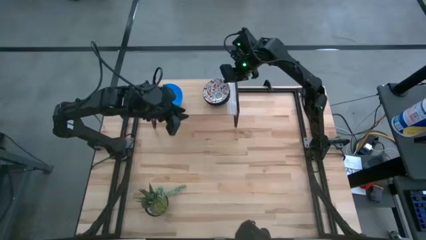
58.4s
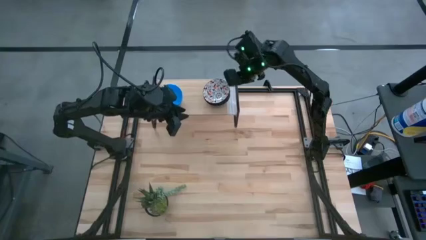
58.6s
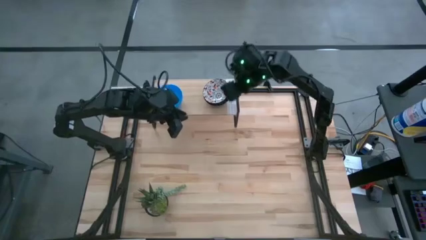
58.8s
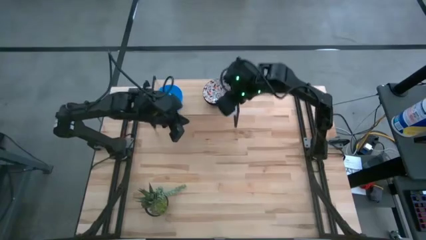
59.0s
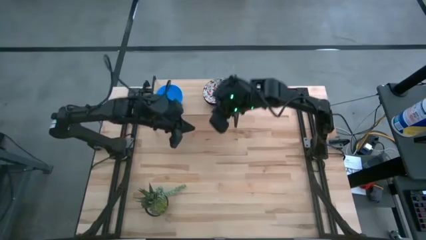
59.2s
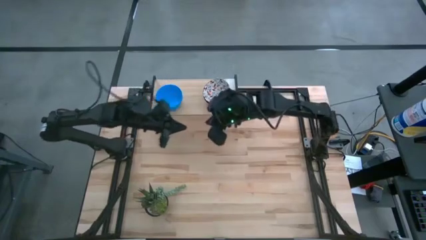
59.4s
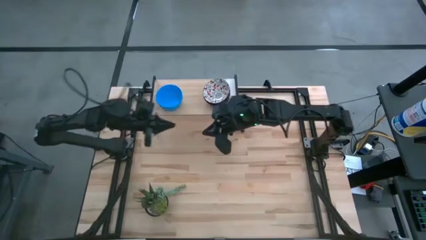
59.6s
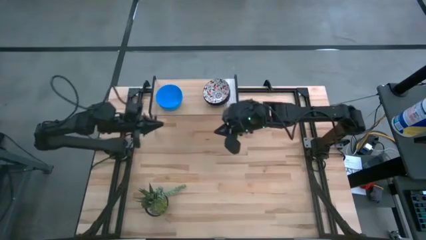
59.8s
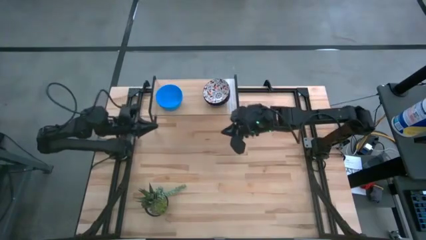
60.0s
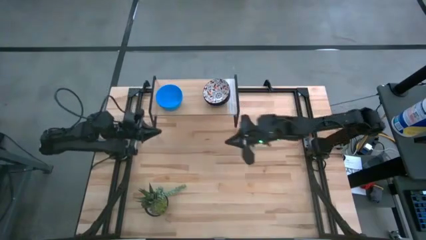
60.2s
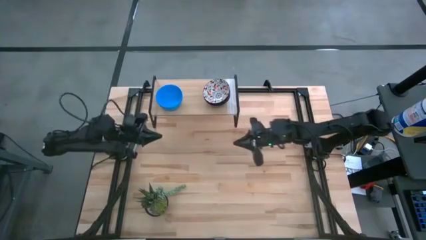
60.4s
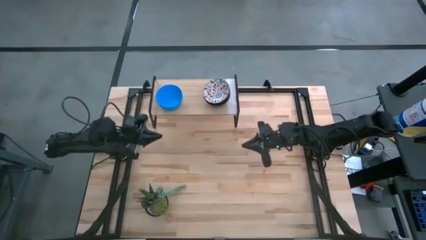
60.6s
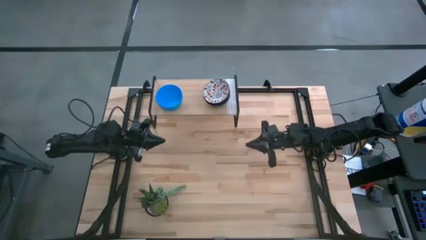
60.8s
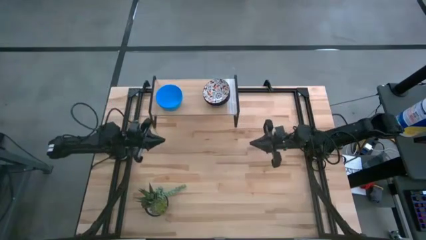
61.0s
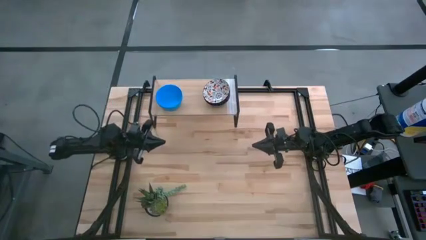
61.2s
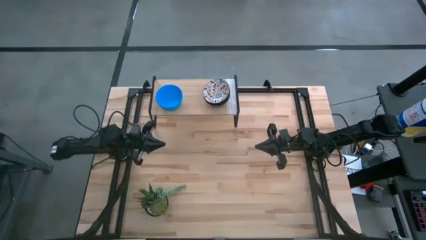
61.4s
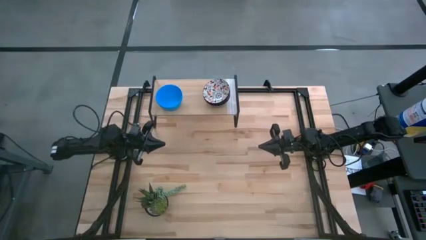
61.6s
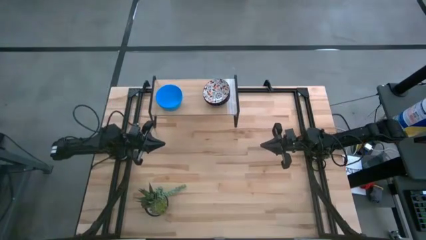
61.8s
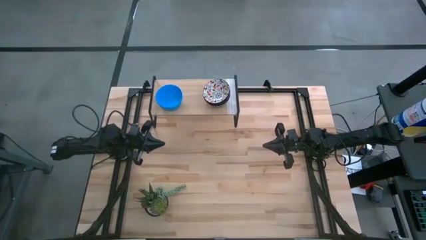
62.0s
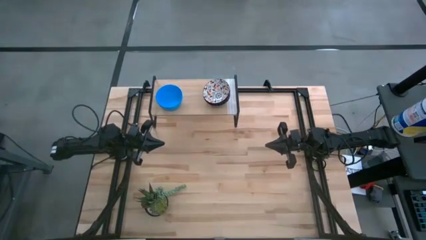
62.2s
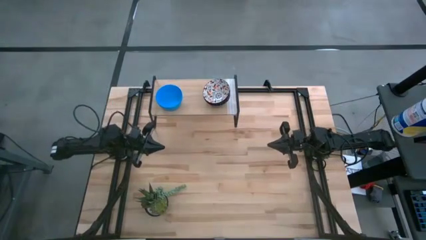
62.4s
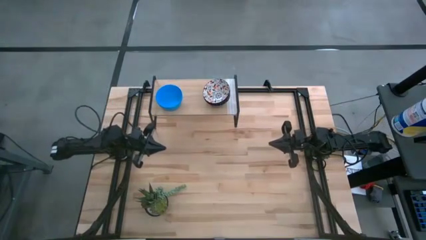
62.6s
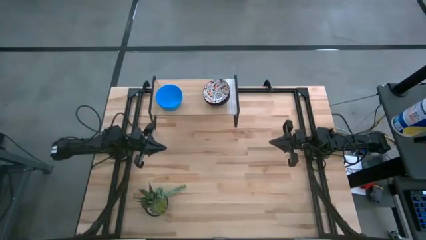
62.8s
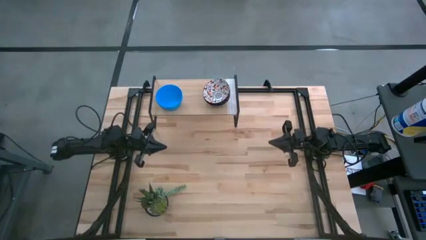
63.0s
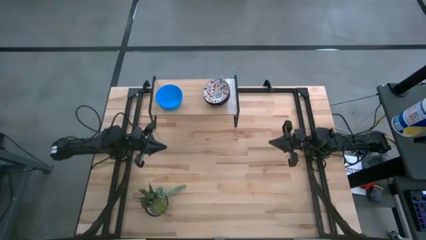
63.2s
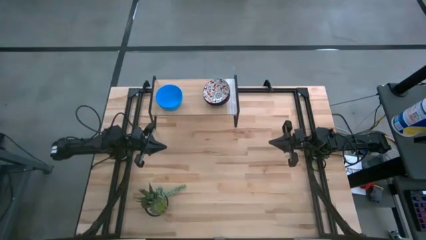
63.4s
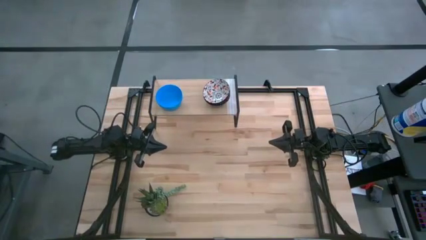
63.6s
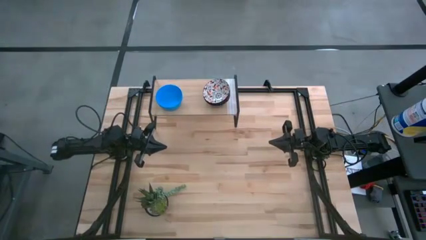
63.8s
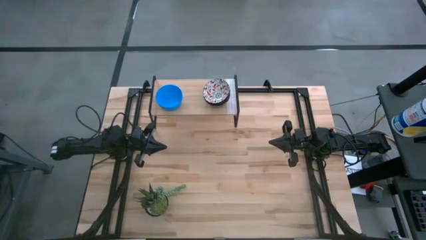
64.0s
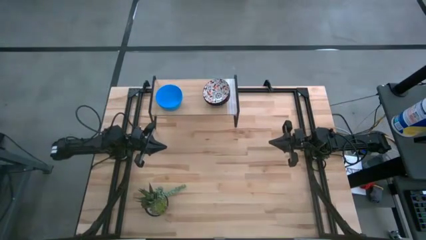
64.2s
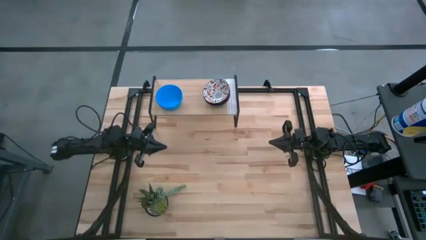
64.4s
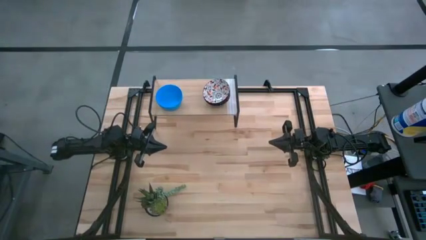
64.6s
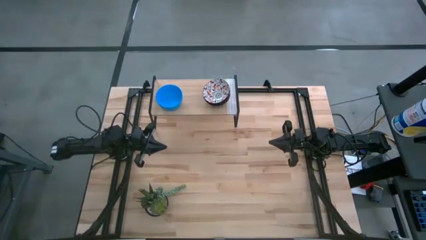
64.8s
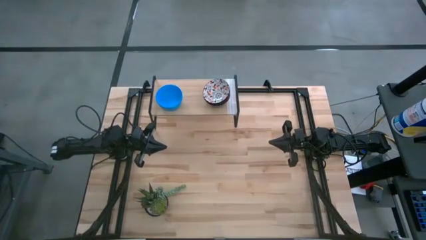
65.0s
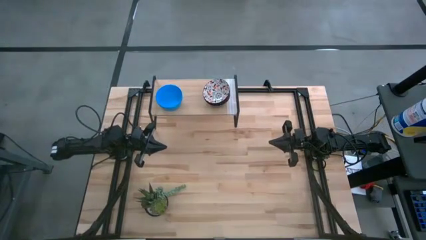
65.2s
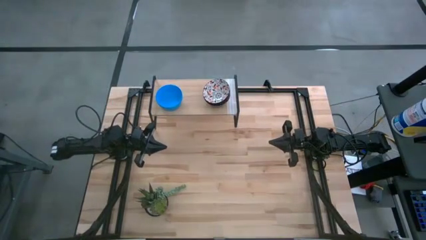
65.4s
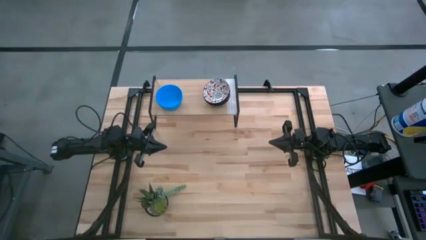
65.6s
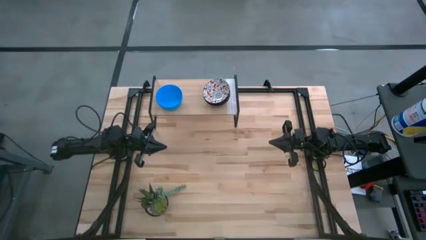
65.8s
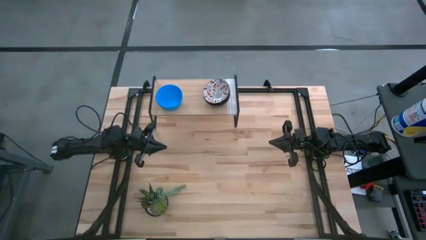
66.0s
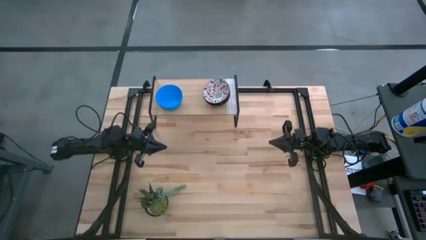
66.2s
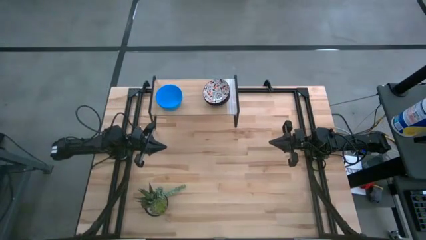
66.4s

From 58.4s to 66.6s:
Task: Pick & Place Mini bowls
Return to Home Position

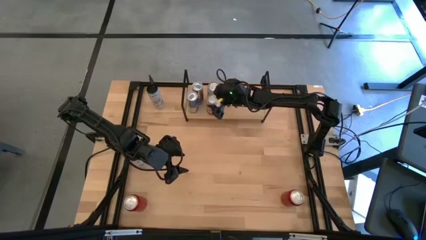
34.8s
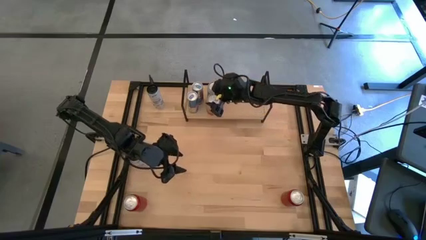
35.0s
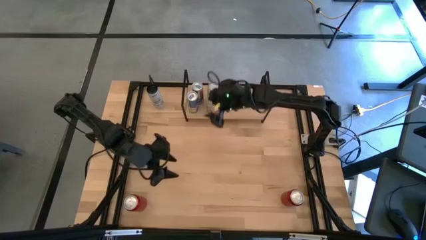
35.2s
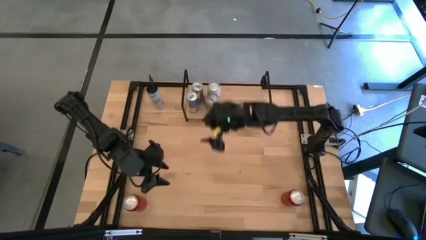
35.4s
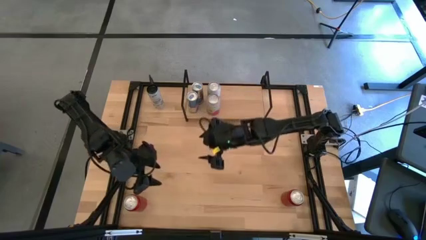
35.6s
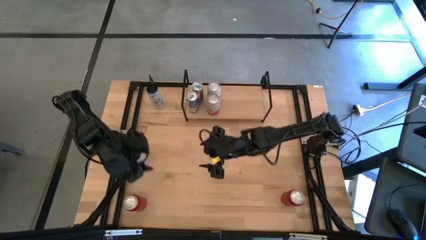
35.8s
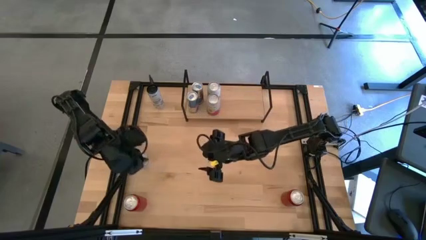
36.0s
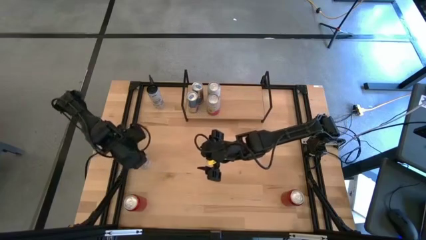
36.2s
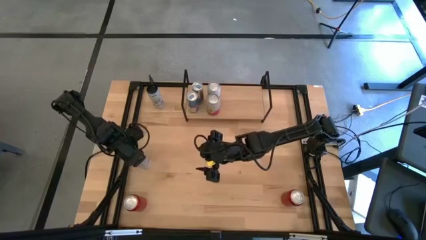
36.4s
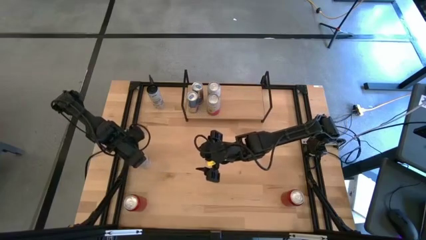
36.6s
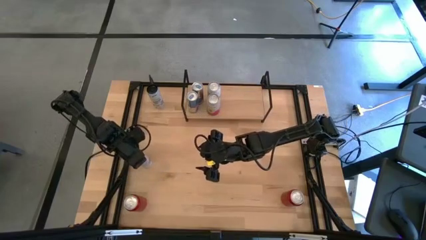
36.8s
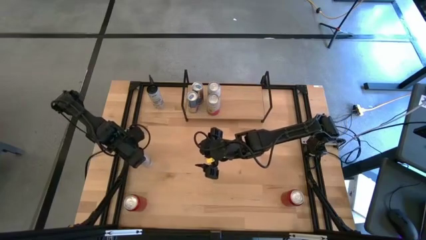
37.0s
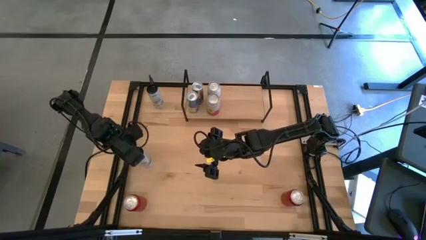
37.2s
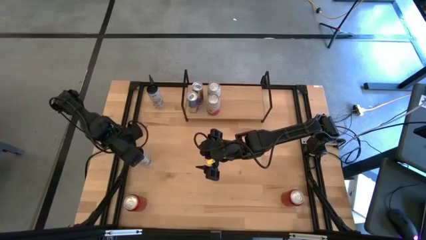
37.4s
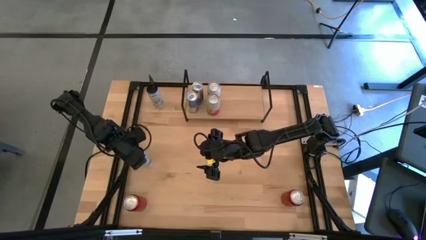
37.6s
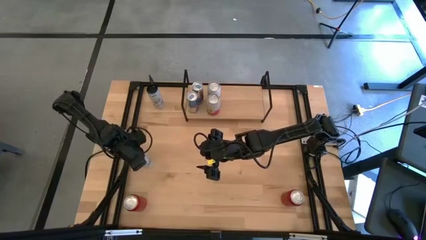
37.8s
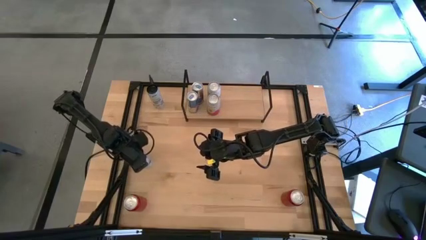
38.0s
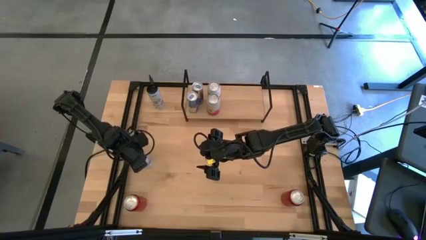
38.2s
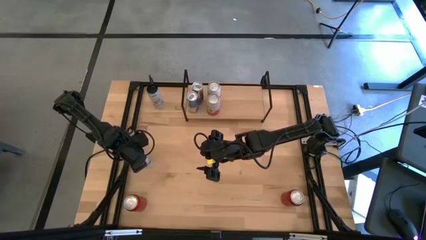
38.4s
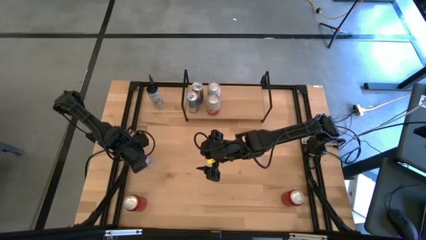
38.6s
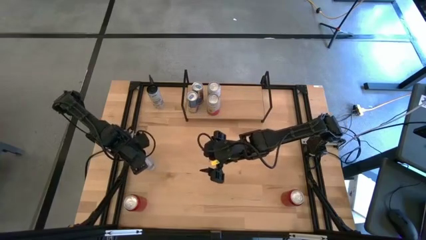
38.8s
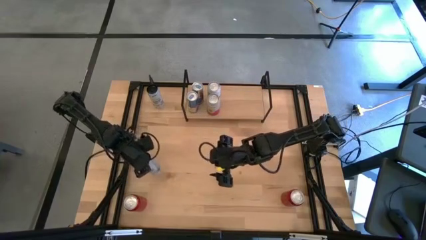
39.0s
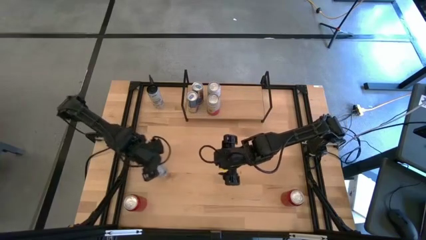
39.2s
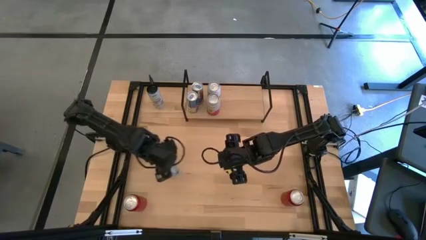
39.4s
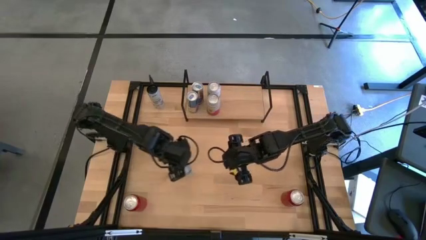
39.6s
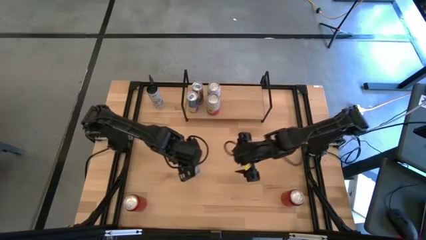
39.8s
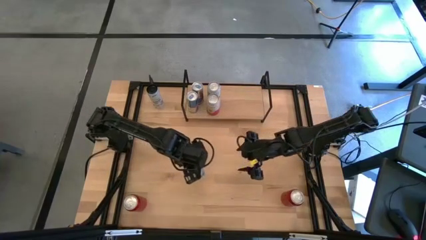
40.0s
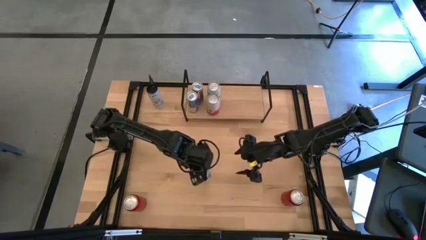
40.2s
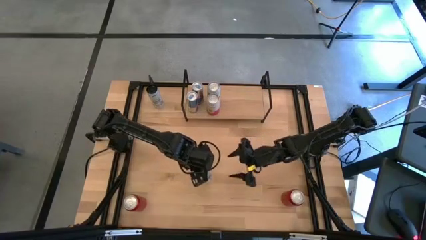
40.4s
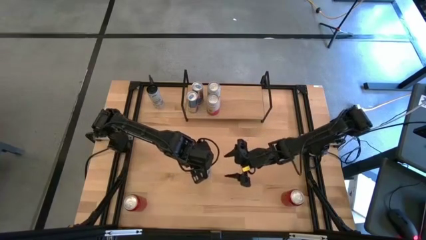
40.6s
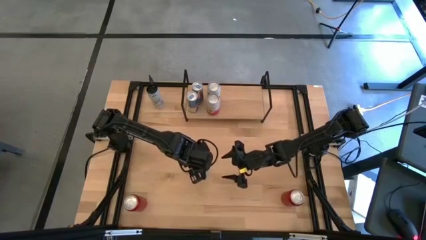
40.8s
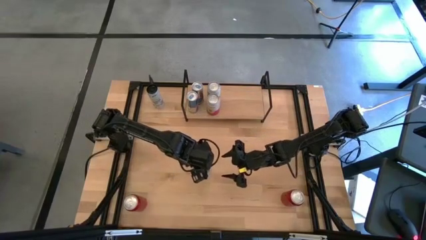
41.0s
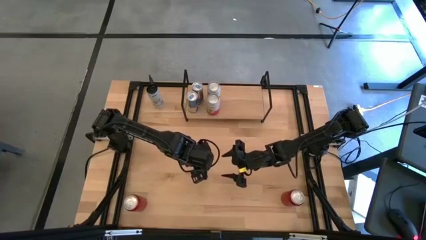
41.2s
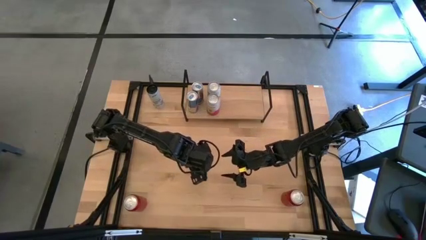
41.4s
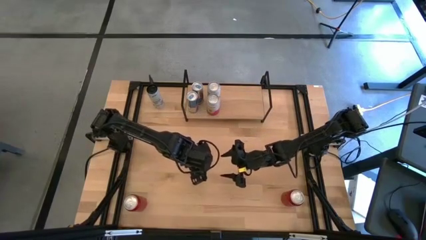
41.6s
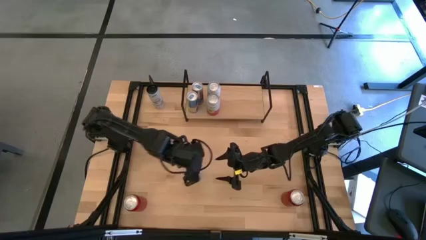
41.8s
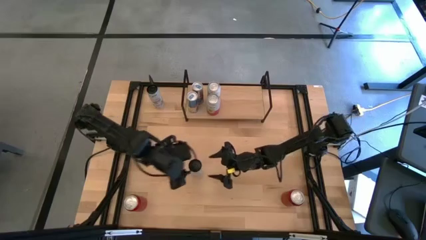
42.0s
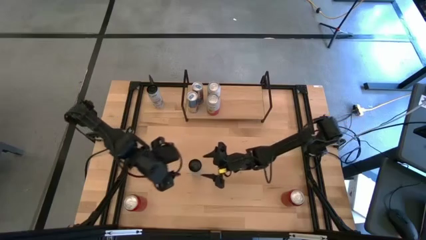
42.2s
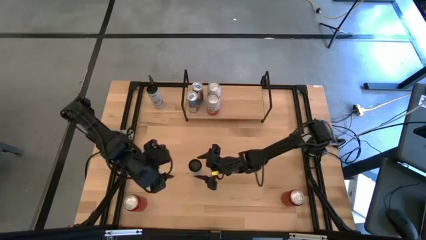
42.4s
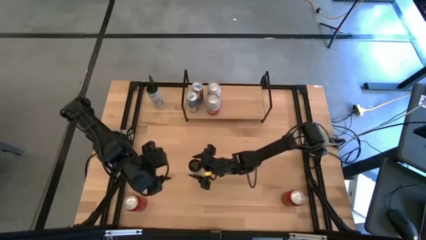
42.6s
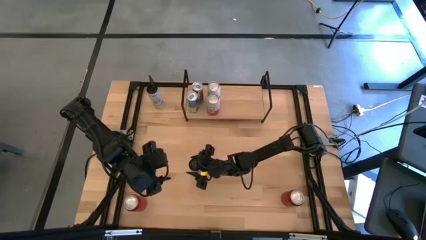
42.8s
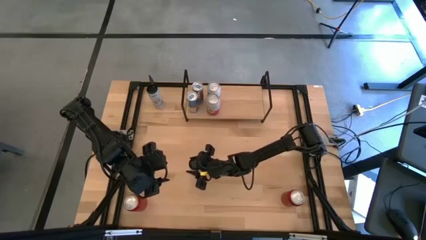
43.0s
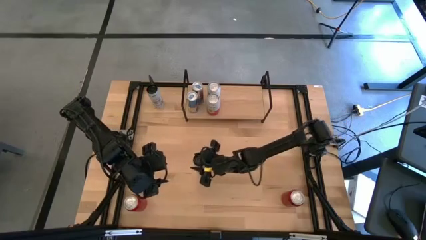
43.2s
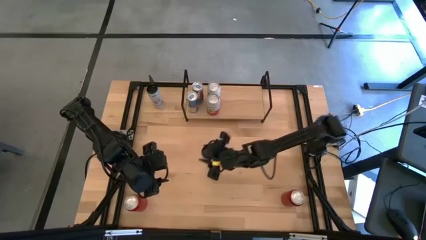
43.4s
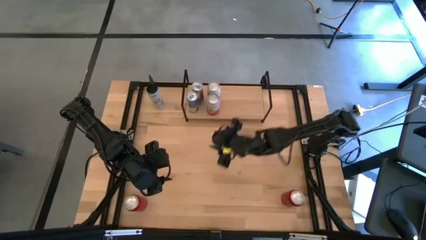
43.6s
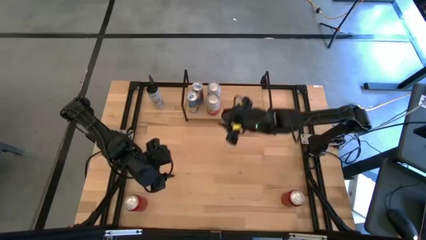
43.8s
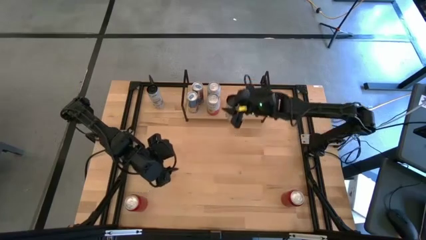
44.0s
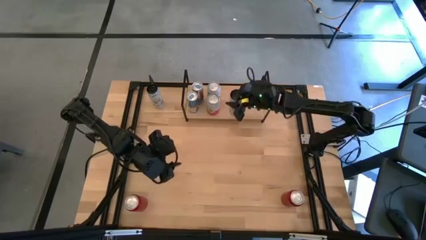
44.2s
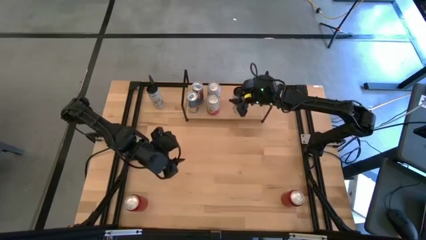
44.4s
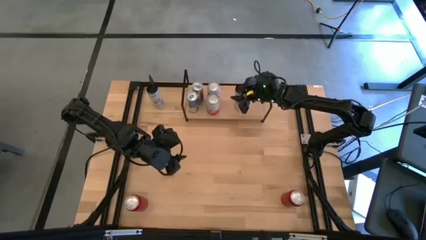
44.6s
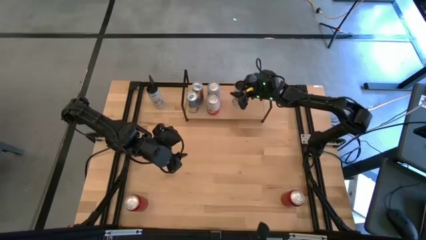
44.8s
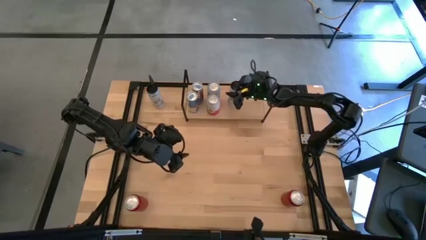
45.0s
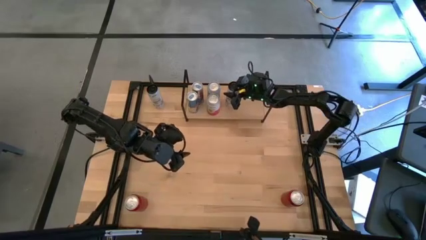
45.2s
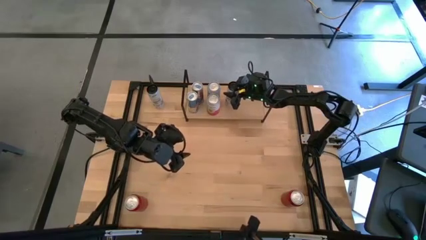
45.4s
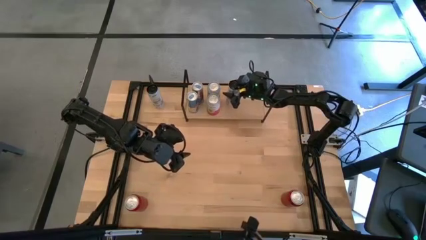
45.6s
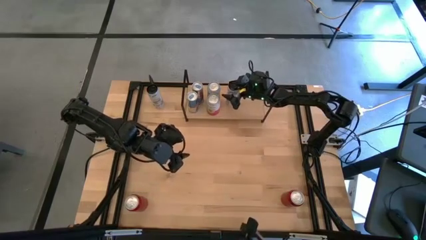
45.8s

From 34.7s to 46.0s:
Task: Place canned beverage on shelf
Put the bottom white soda can on the shelf
